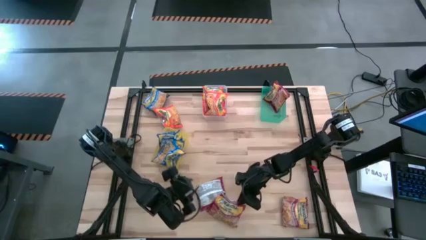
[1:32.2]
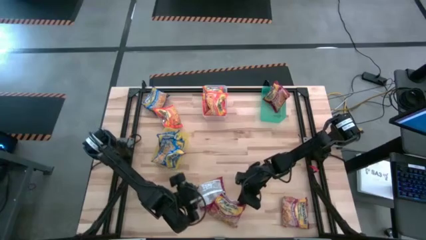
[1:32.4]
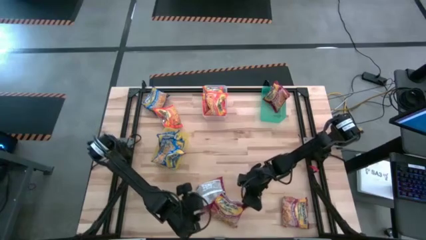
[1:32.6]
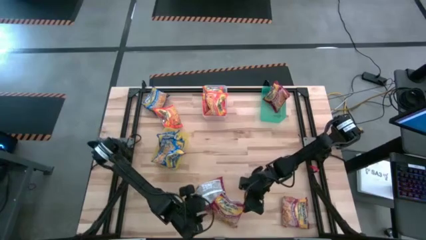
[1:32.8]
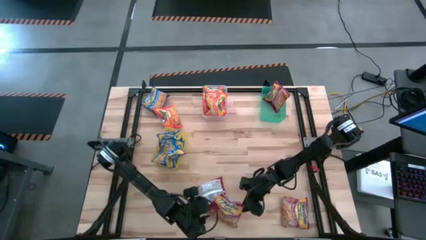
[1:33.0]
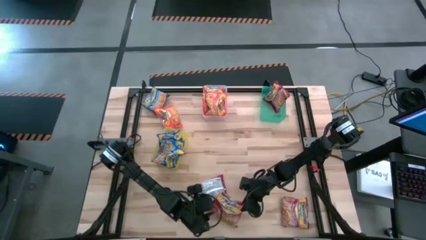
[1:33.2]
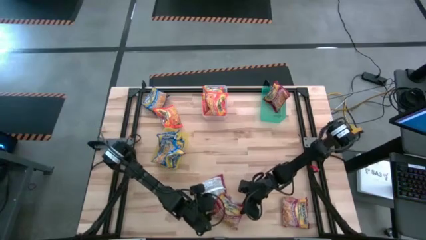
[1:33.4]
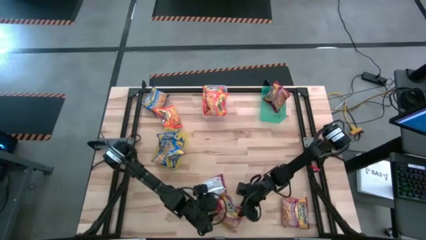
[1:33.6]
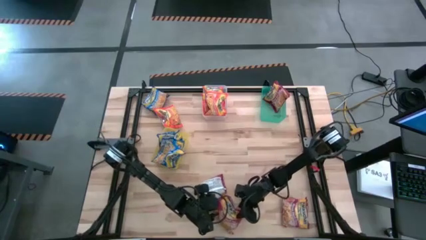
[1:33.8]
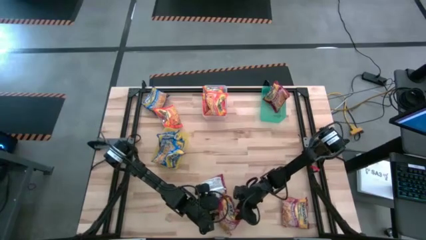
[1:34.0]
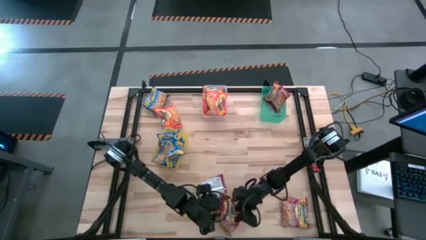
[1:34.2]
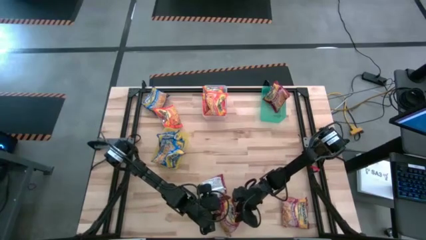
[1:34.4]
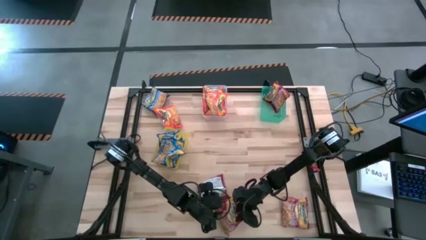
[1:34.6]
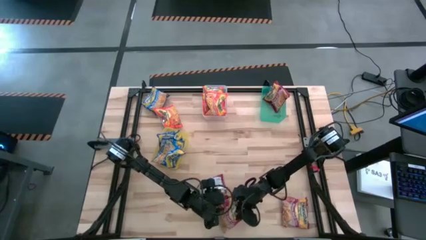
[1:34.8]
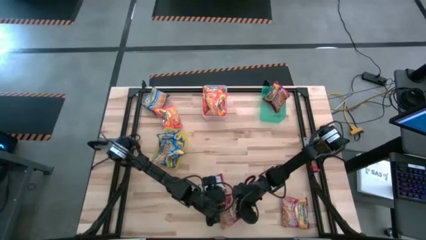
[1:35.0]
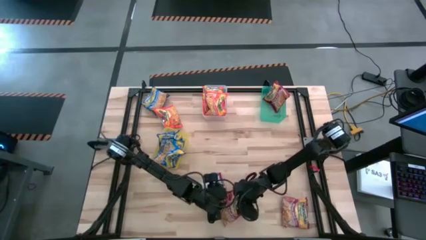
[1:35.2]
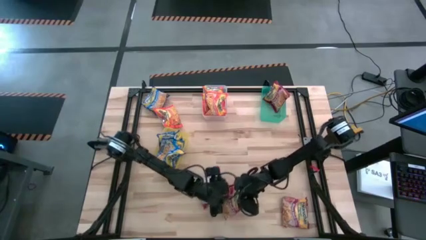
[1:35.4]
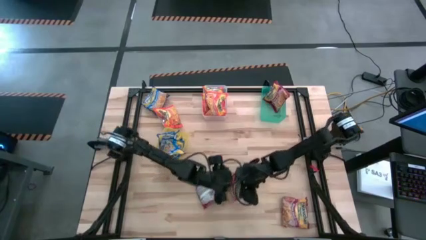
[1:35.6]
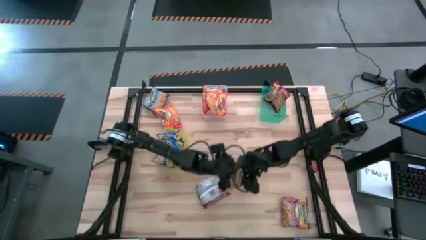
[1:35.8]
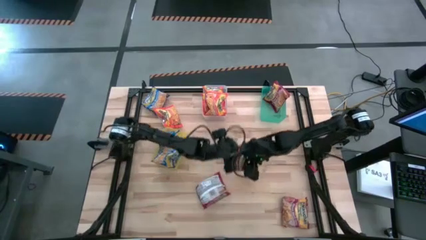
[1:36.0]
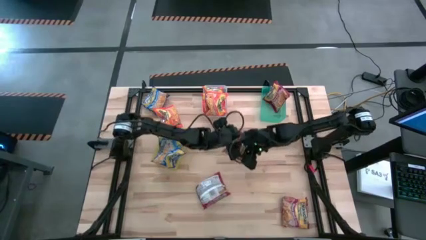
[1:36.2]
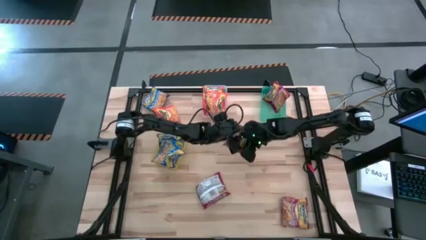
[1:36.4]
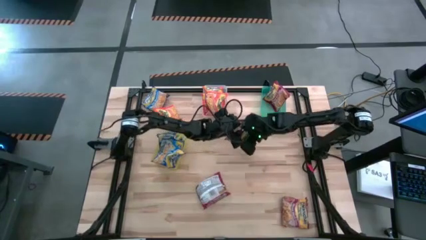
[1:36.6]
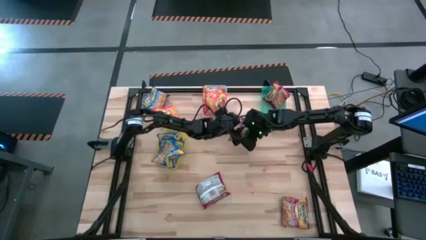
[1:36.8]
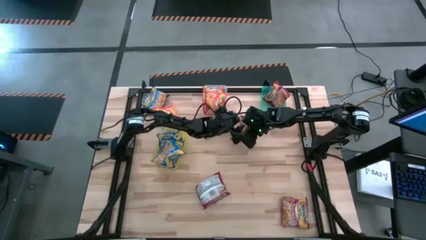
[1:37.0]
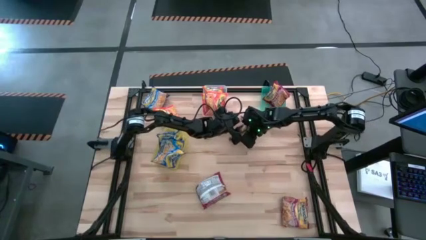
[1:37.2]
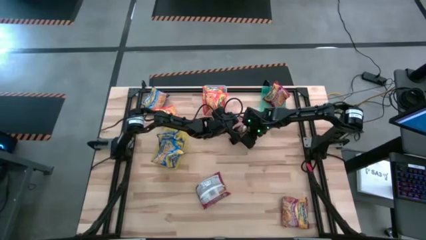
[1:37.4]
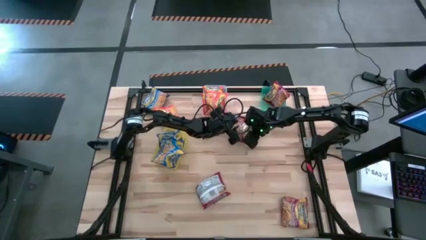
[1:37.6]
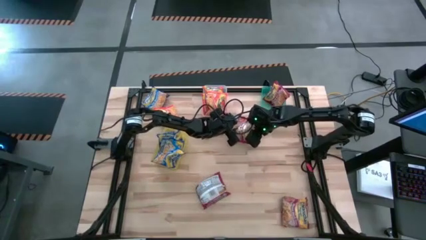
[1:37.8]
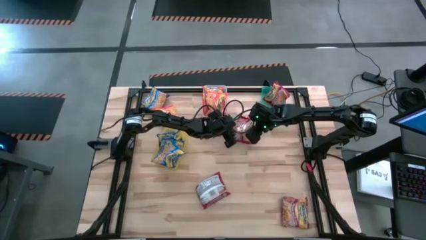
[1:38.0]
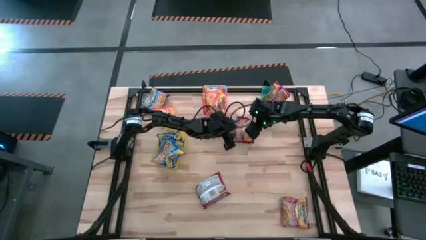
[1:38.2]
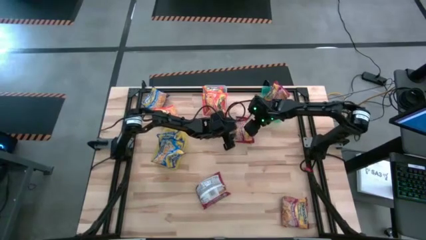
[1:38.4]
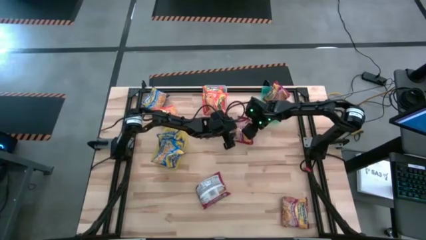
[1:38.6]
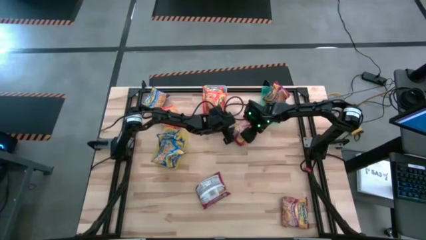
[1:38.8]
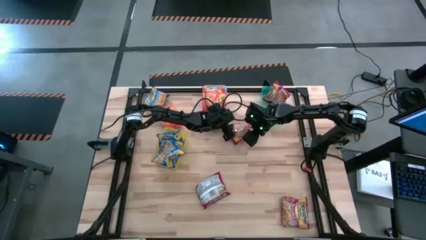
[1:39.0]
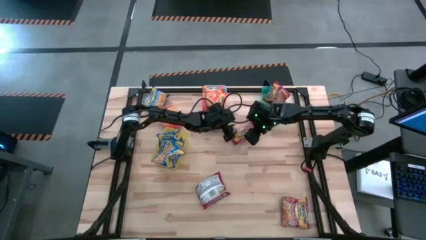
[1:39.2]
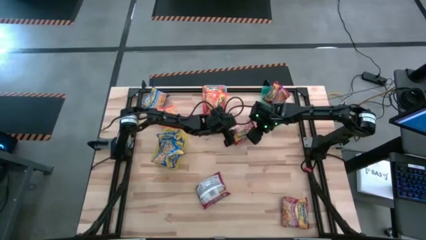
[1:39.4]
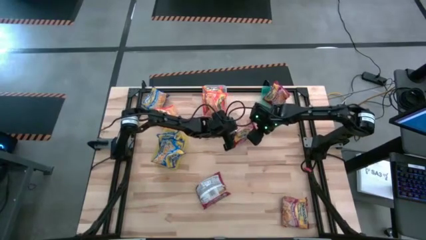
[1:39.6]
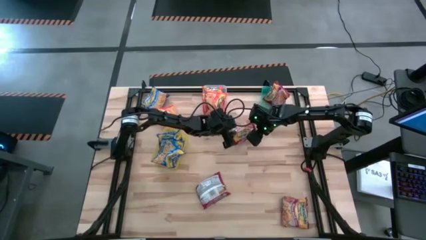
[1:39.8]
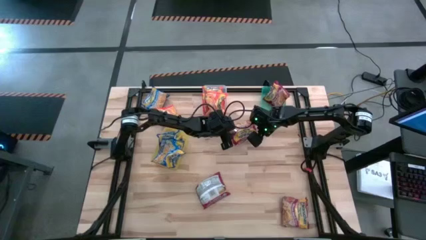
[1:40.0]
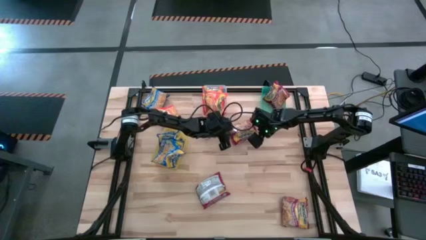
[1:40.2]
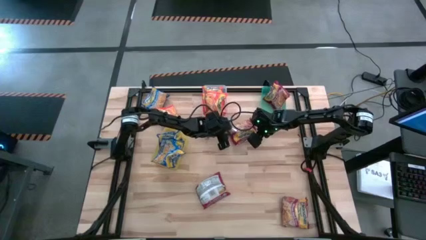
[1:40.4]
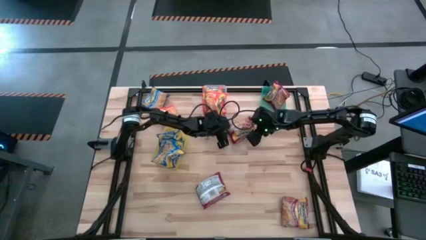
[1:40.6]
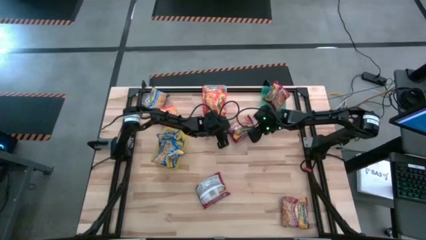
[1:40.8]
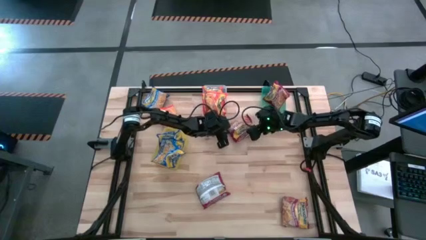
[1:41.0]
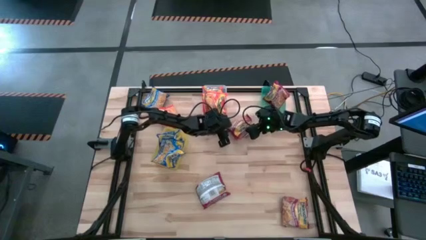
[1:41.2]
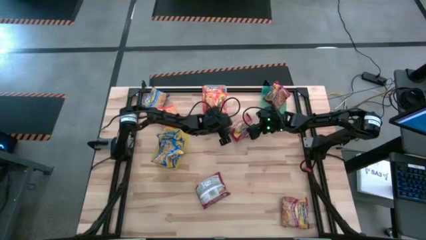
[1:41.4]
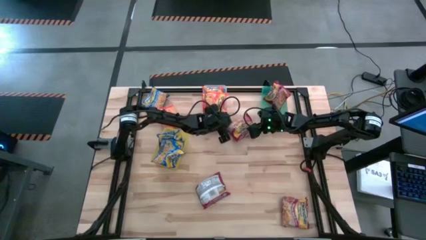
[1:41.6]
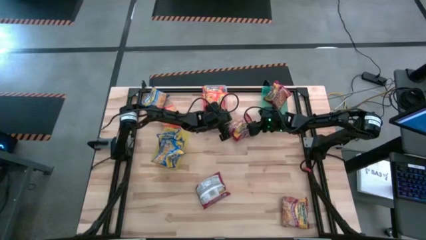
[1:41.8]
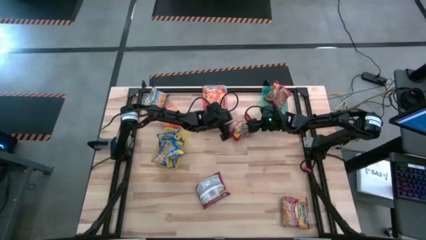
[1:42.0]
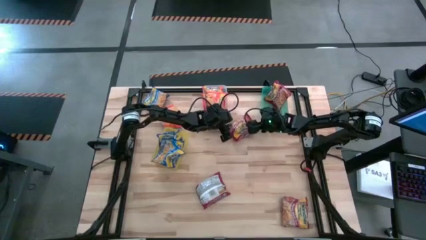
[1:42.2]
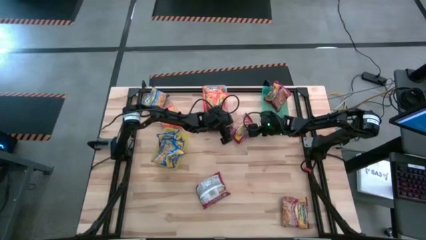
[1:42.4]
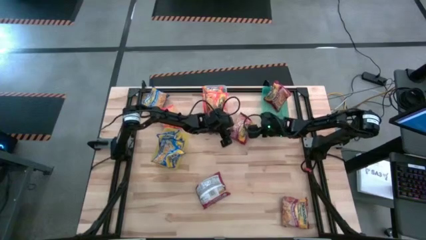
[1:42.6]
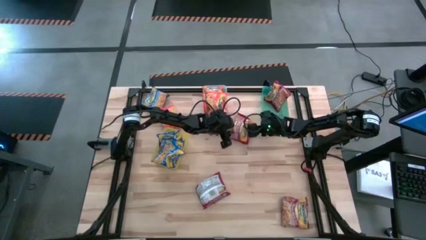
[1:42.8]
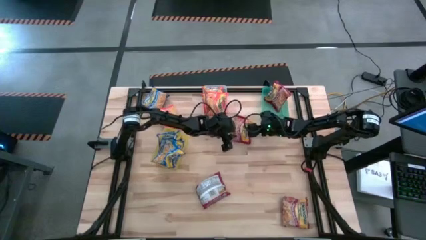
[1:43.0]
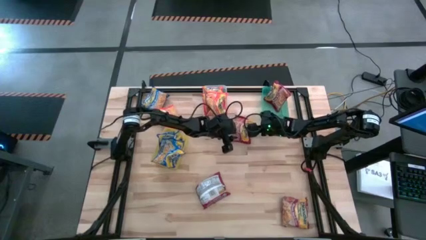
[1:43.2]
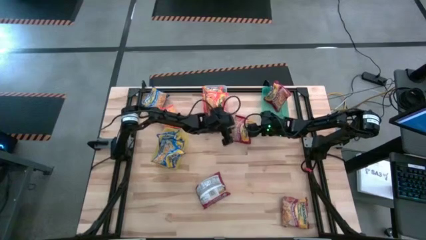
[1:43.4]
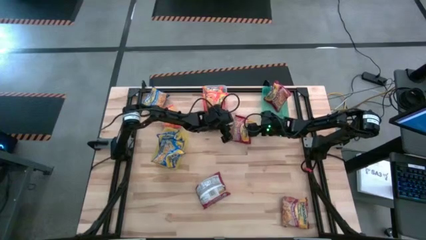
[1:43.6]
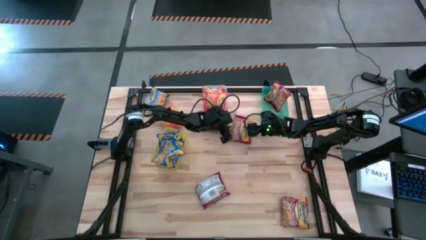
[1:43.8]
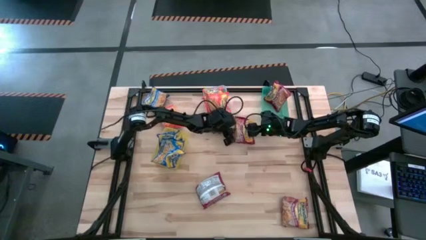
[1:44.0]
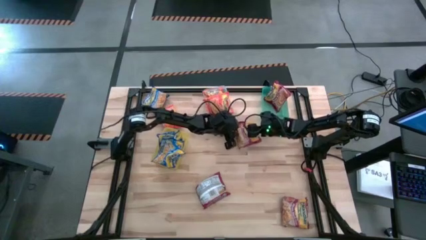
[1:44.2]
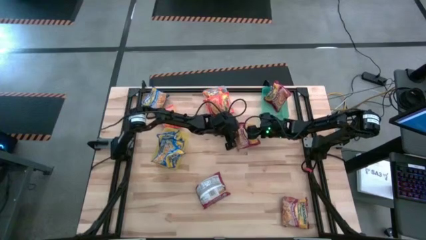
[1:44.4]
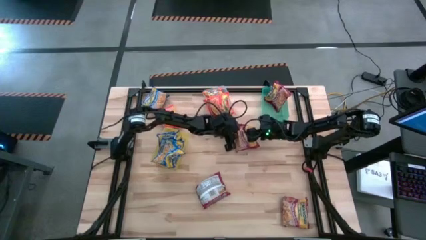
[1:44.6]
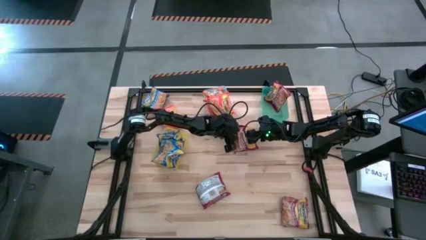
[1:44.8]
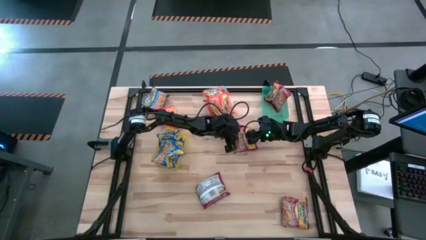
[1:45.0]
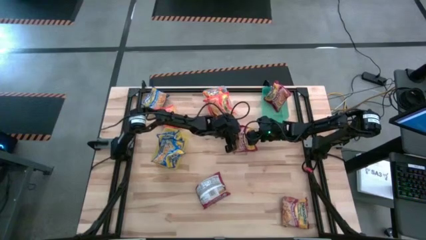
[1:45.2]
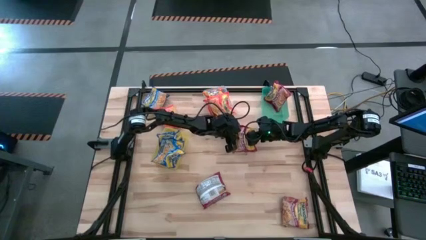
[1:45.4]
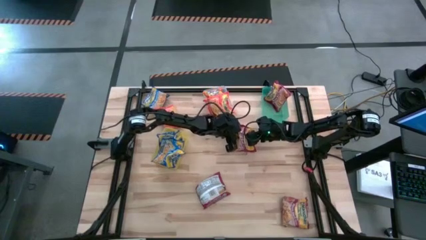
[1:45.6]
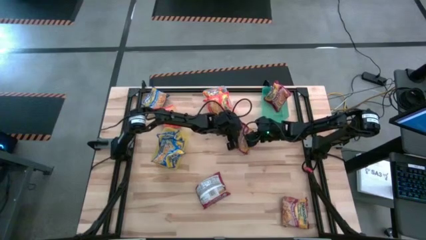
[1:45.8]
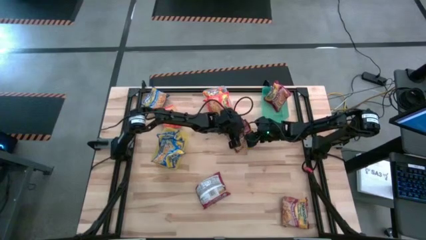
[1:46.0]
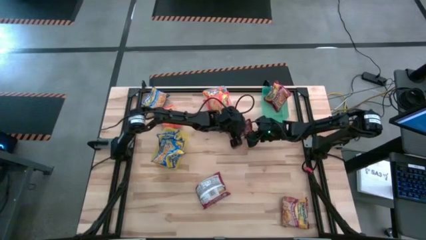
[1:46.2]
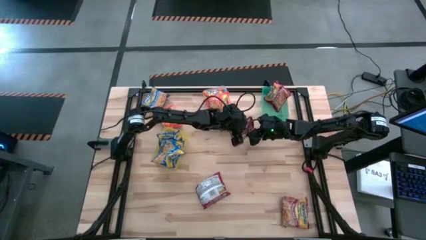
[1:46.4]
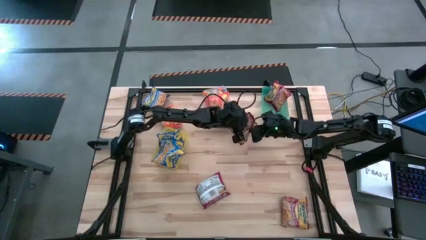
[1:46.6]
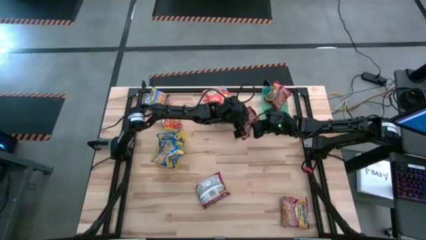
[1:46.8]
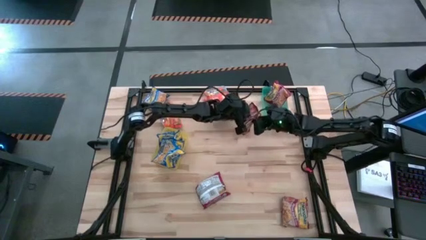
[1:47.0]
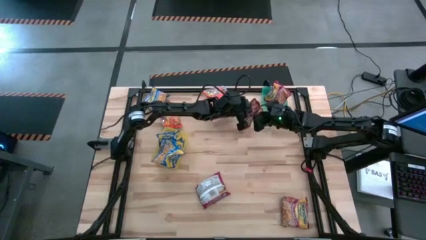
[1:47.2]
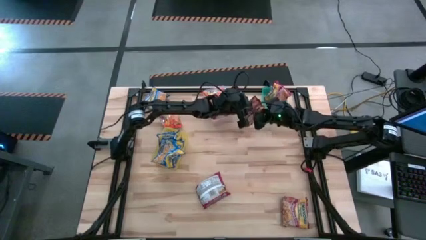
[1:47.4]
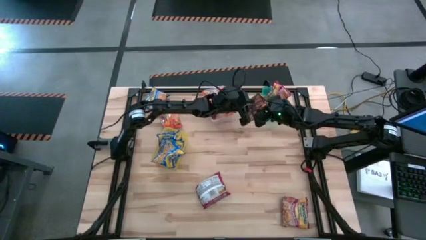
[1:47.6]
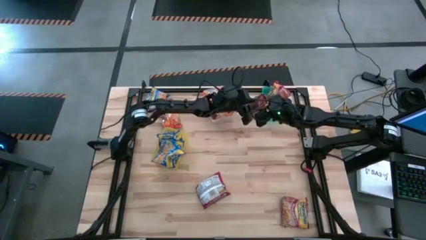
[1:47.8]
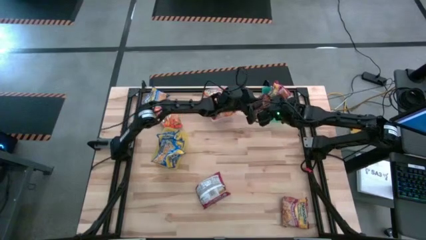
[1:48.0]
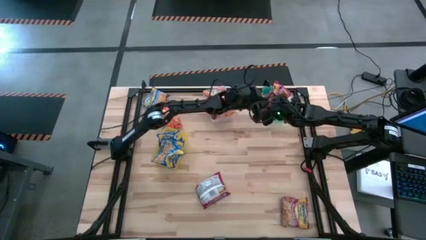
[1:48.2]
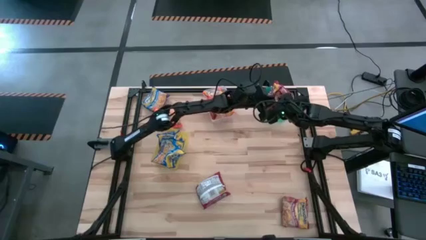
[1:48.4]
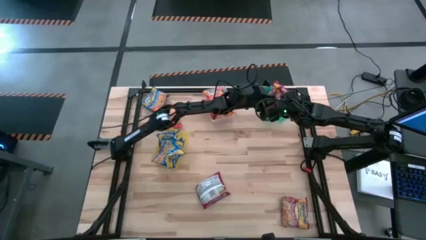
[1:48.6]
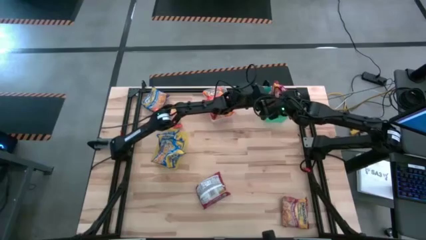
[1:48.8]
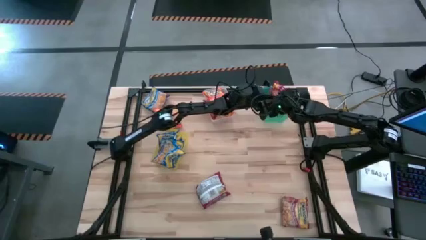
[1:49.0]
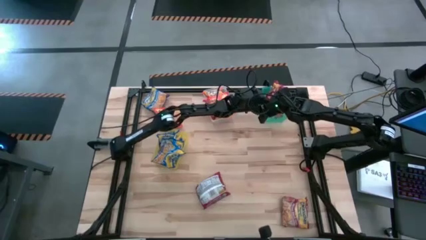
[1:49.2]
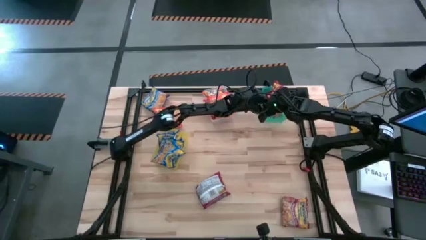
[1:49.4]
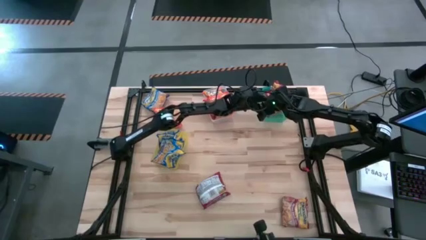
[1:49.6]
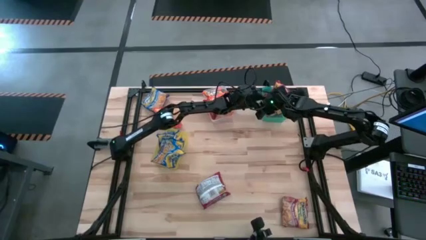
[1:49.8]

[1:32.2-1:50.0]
Task: Sort Maruchan noodles
Put the red noodle pack into the green bin
